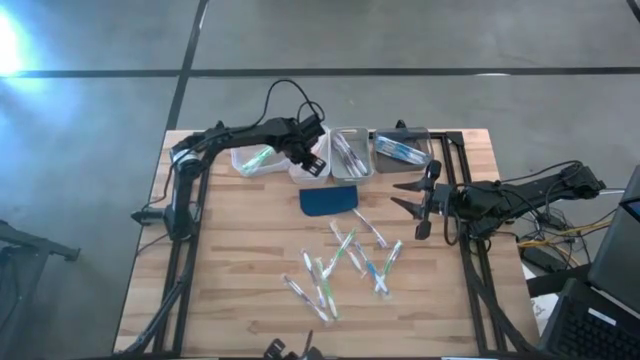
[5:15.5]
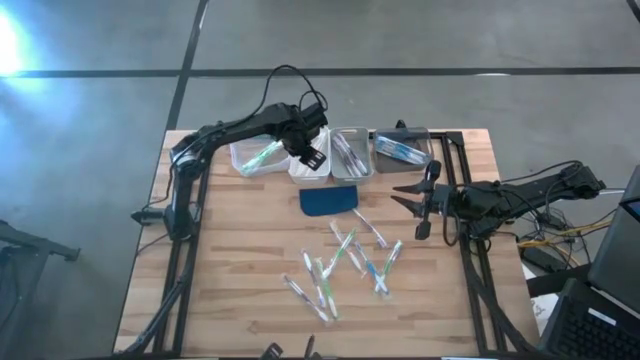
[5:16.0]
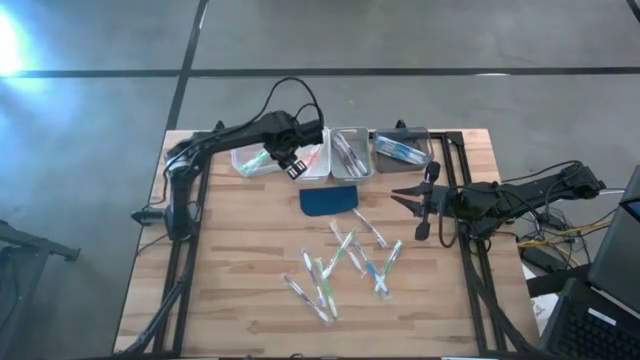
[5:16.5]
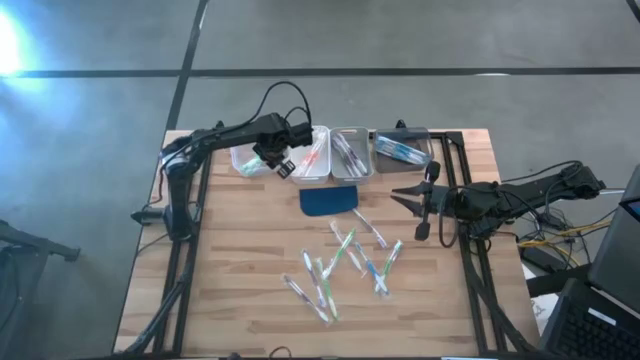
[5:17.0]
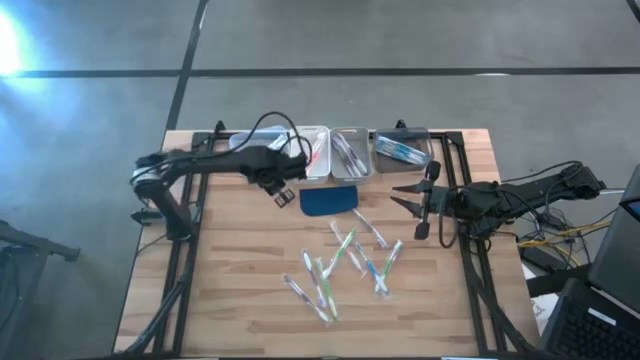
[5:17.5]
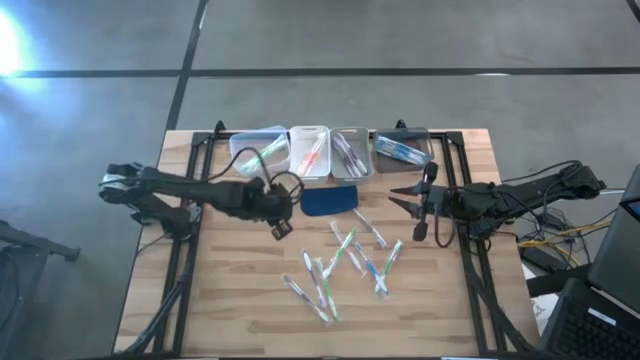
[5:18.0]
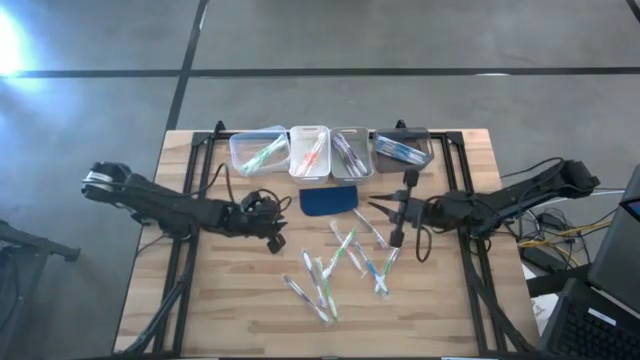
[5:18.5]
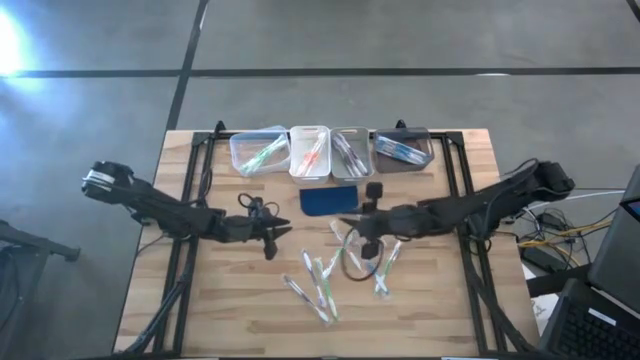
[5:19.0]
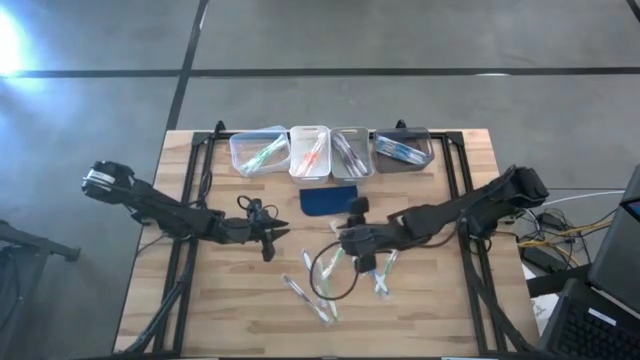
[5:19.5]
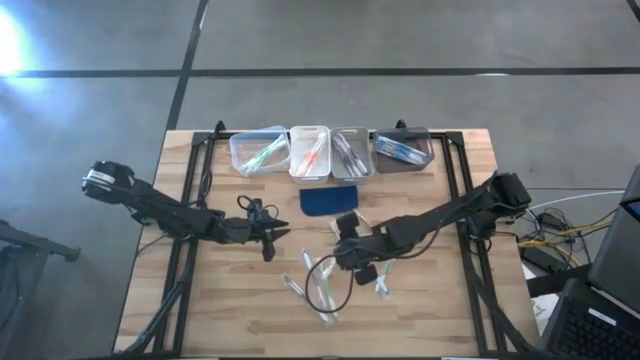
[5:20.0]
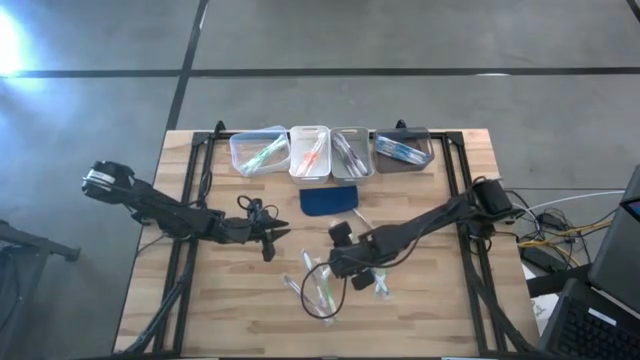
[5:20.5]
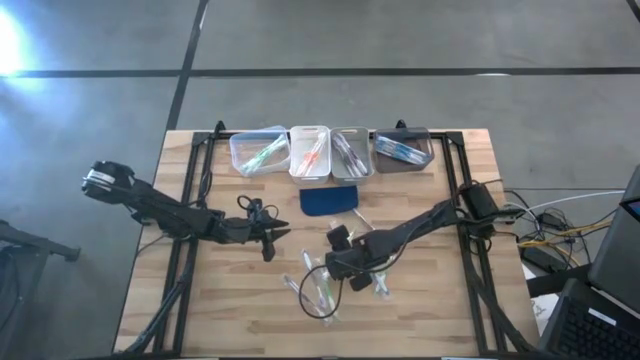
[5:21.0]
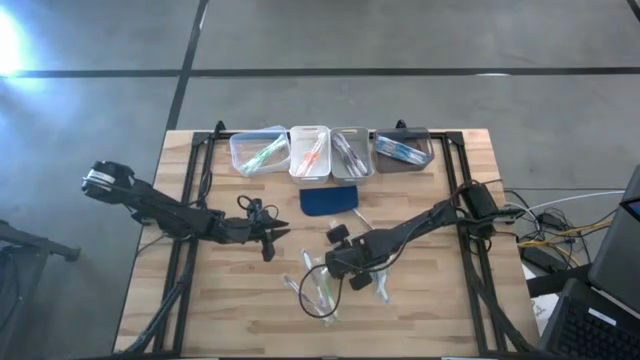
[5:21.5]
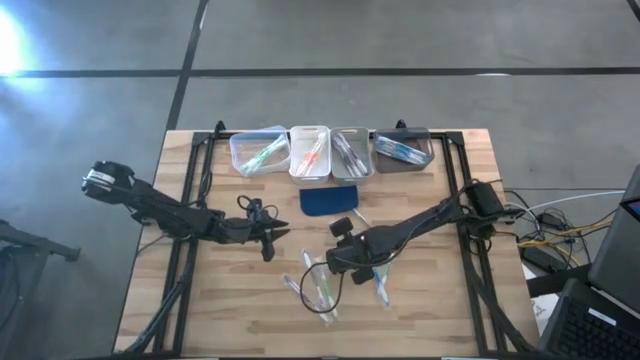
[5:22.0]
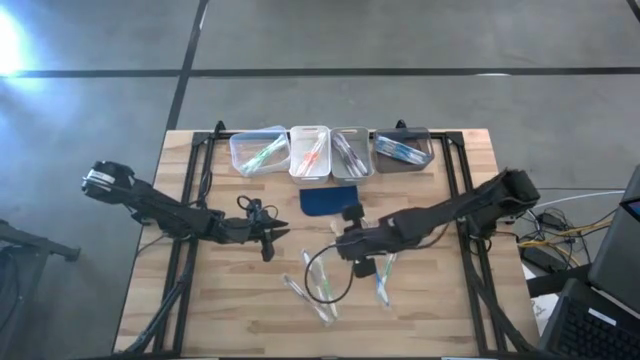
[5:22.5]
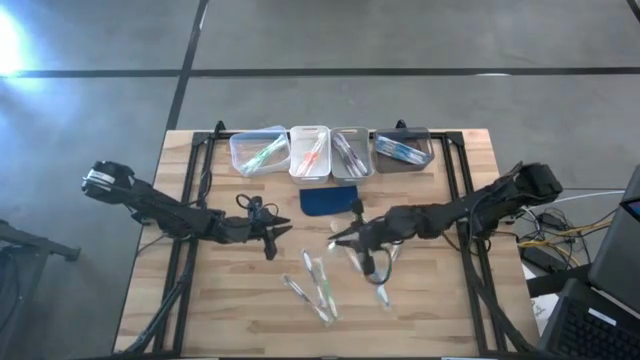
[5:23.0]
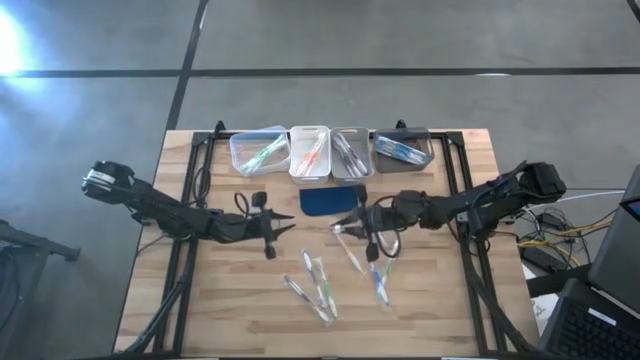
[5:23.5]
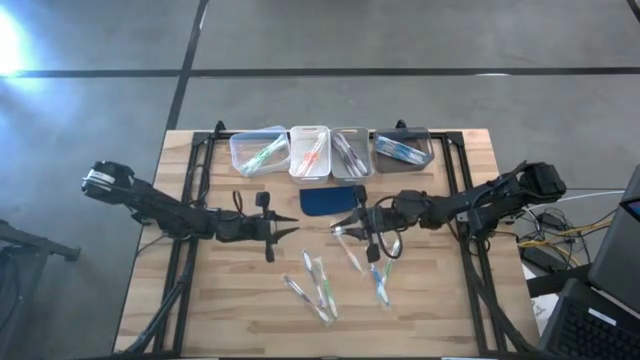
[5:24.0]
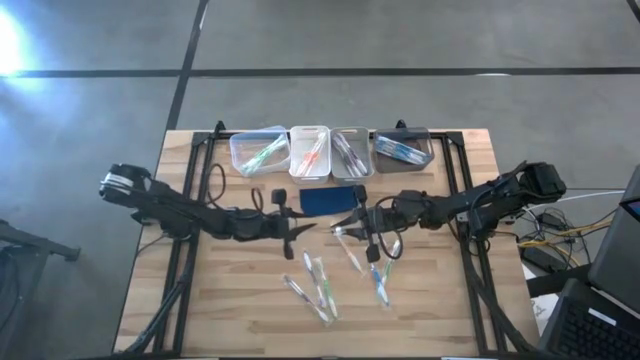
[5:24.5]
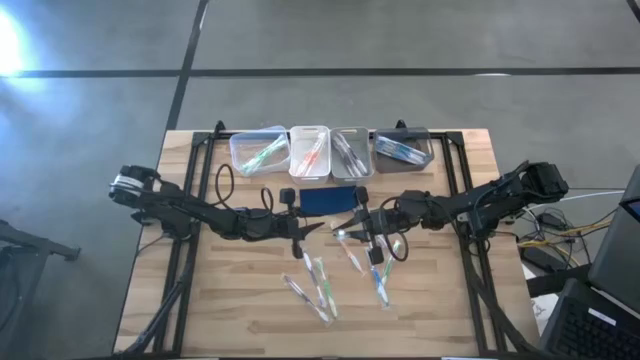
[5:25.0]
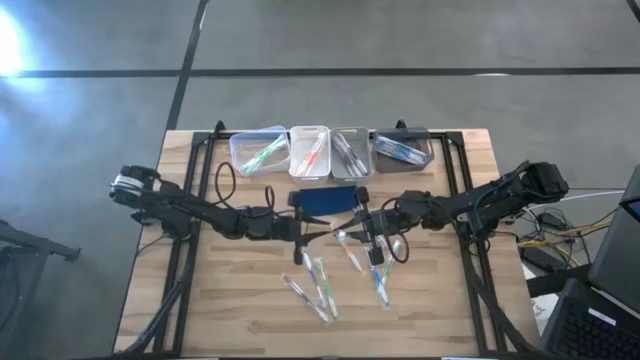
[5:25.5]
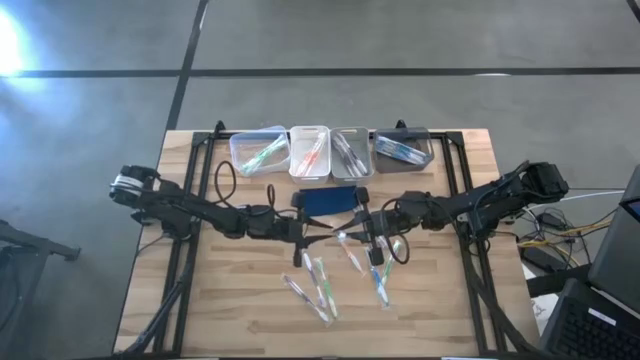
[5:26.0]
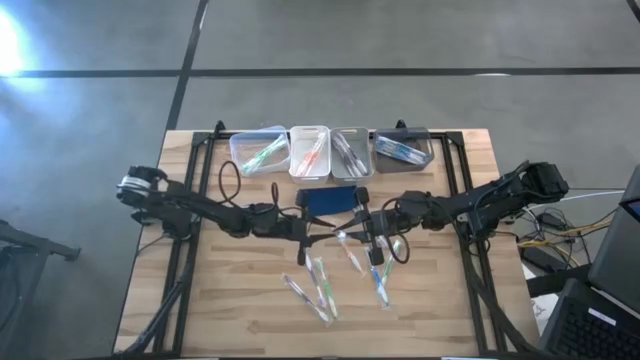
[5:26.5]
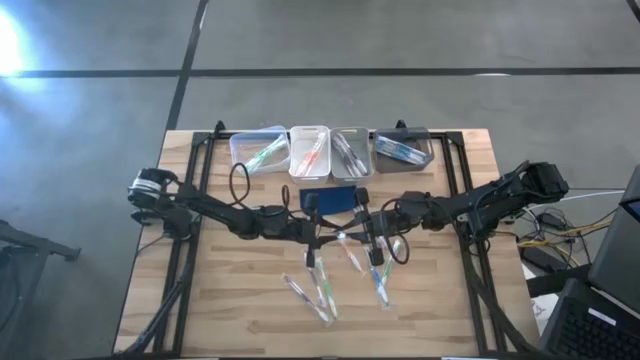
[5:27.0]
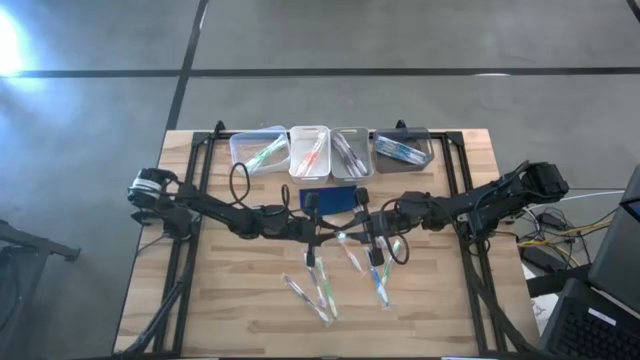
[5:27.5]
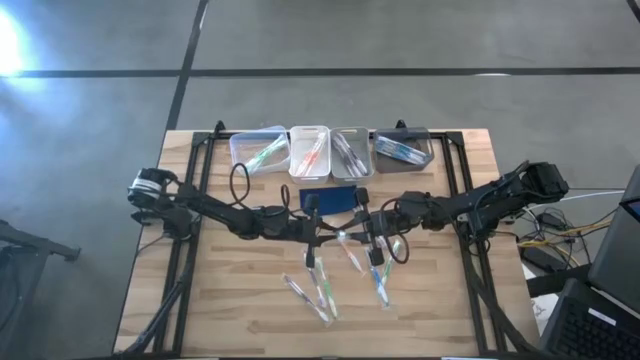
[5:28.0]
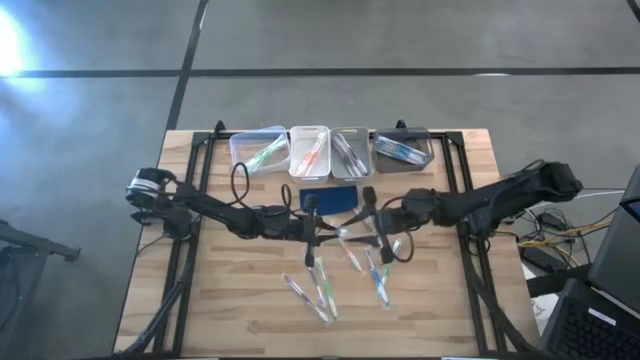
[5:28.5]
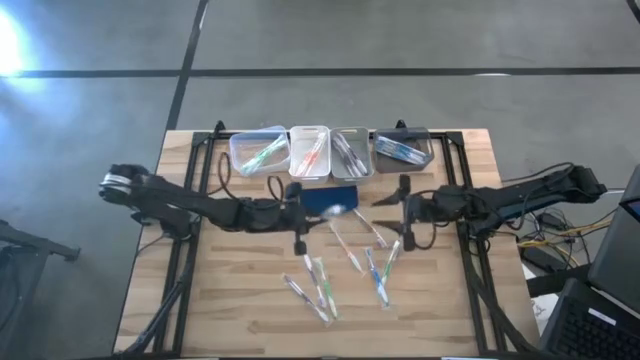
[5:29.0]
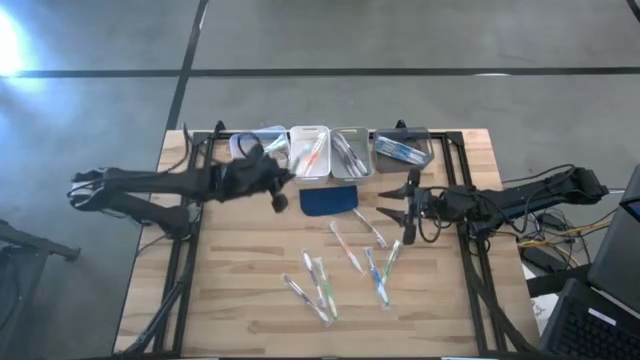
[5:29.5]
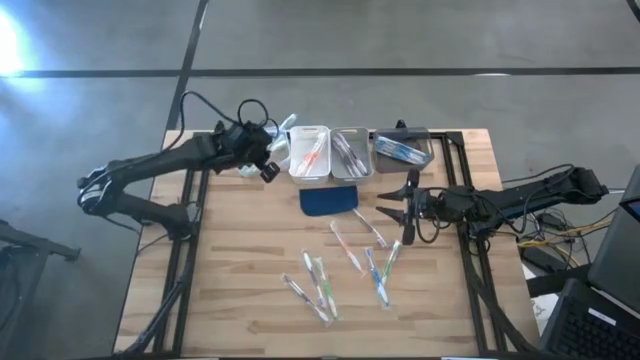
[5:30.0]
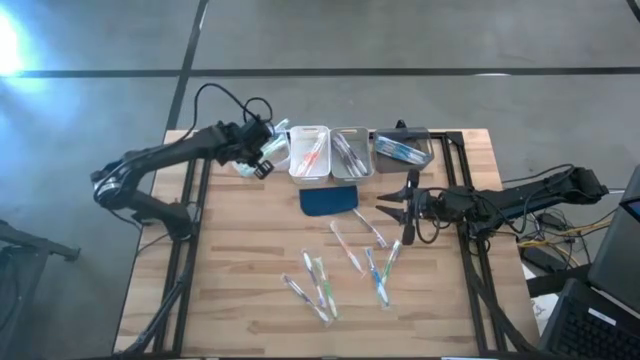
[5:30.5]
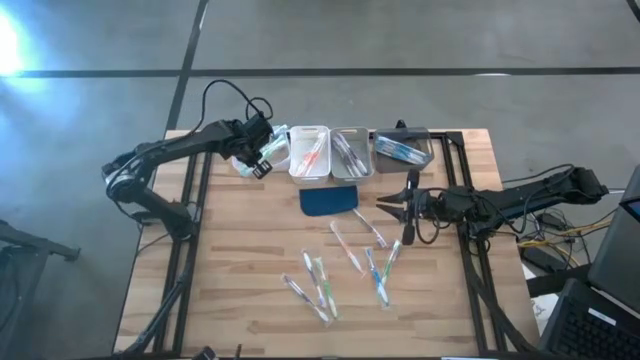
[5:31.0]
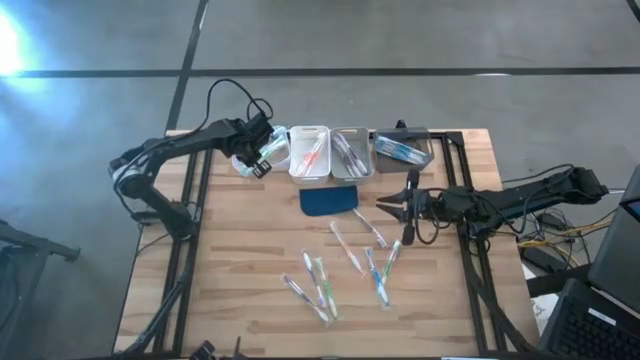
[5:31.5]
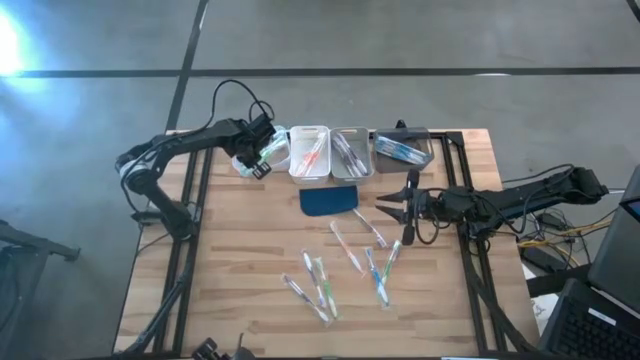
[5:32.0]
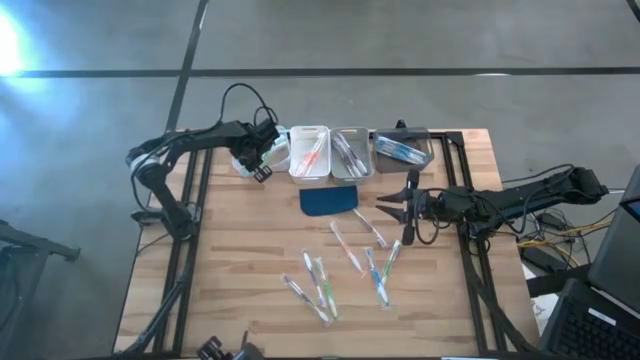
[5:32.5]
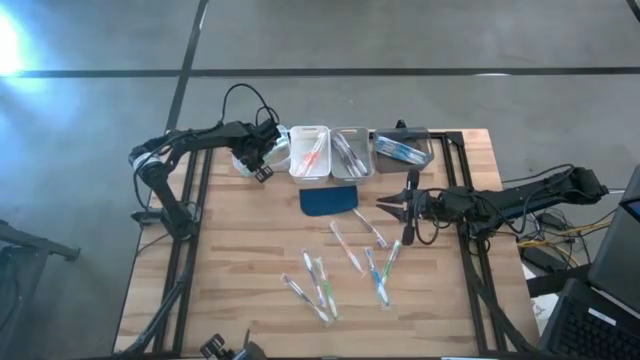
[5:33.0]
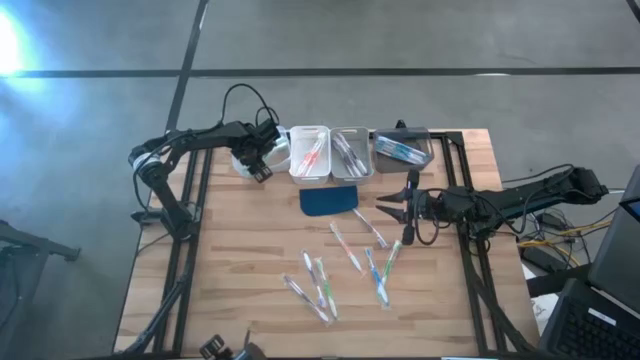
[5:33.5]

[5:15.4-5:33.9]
Task: Pick & Place Toothbrushes
Put the green toothbrush into the transparent bin

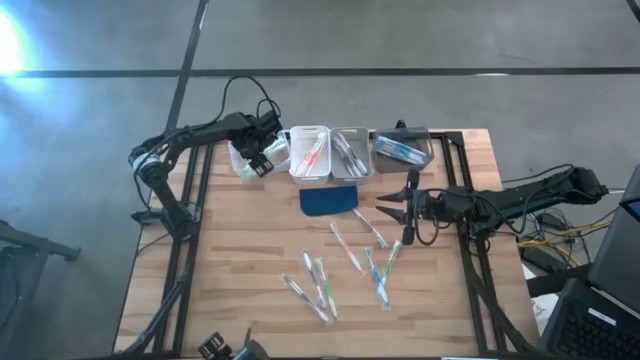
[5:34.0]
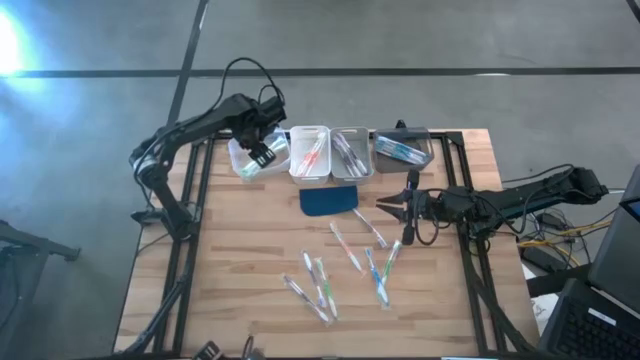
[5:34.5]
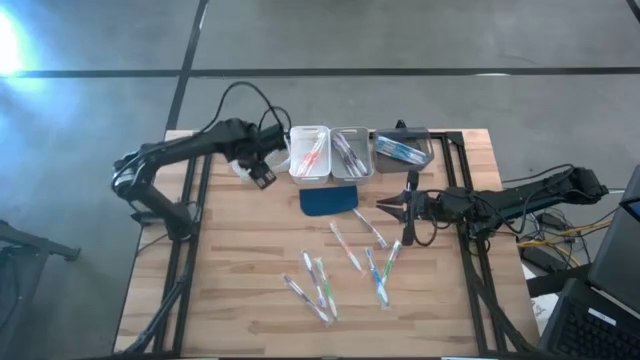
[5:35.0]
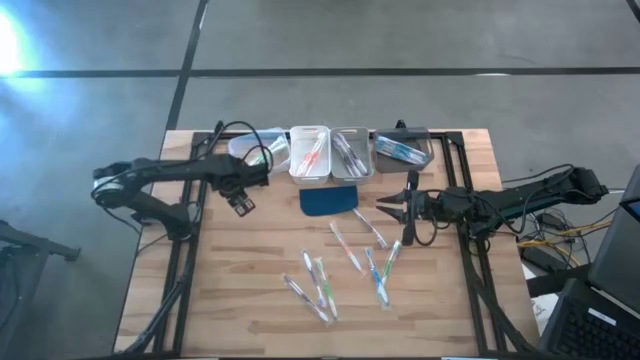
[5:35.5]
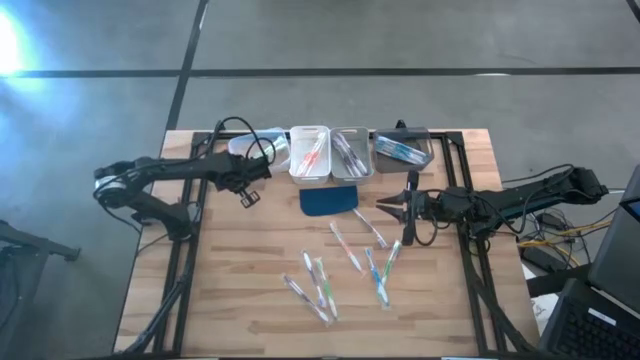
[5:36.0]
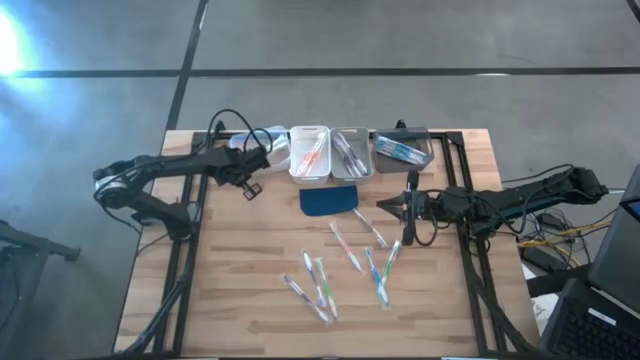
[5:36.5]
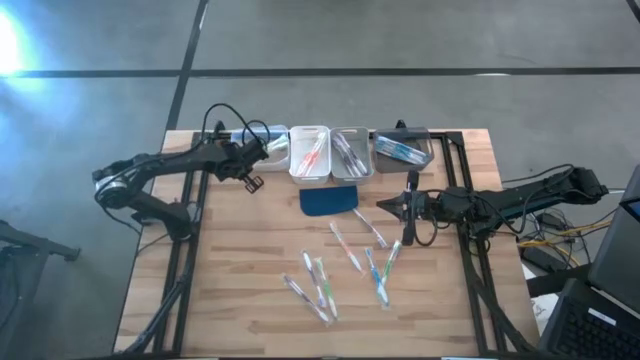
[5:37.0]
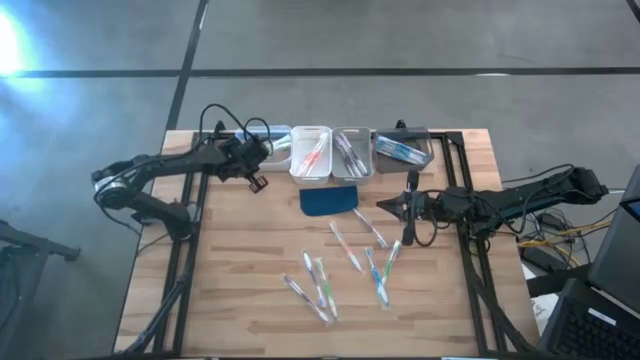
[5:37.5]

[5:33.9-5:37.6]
Adjust the transparent bin
